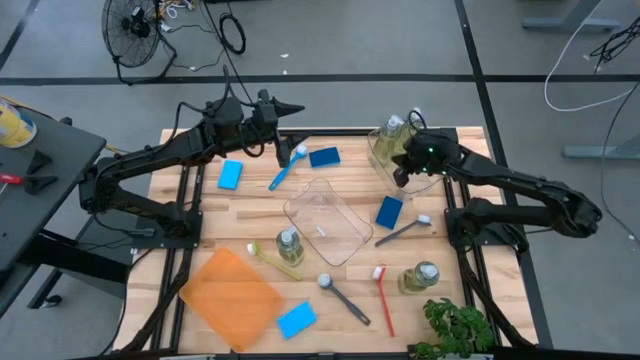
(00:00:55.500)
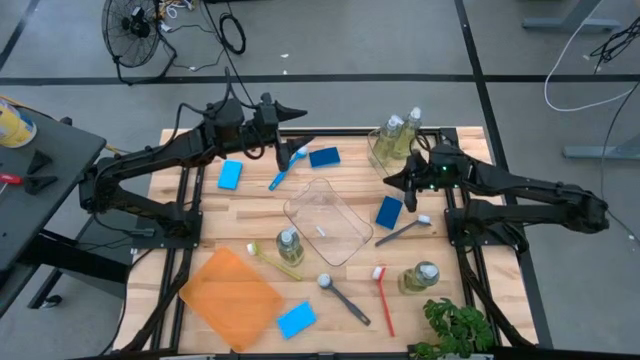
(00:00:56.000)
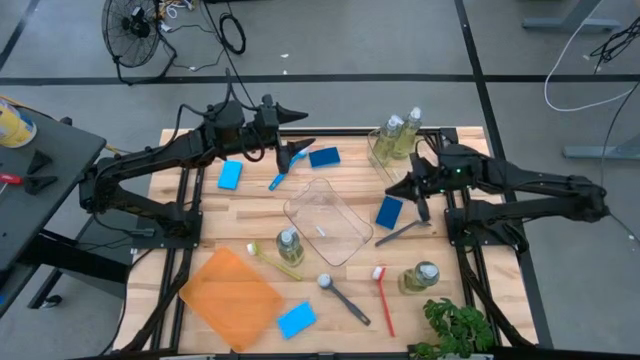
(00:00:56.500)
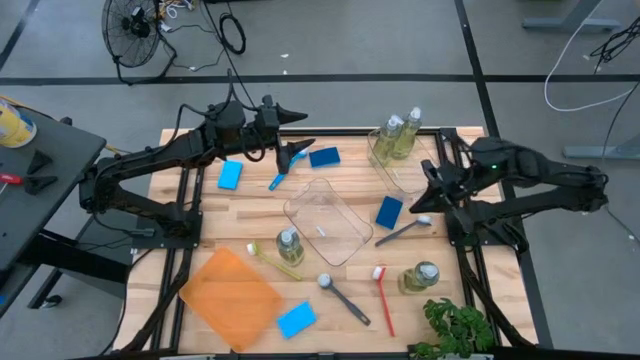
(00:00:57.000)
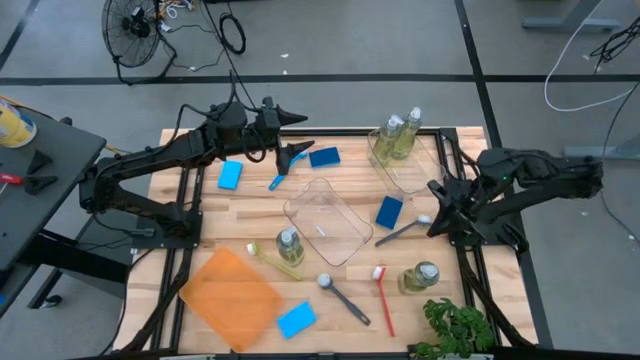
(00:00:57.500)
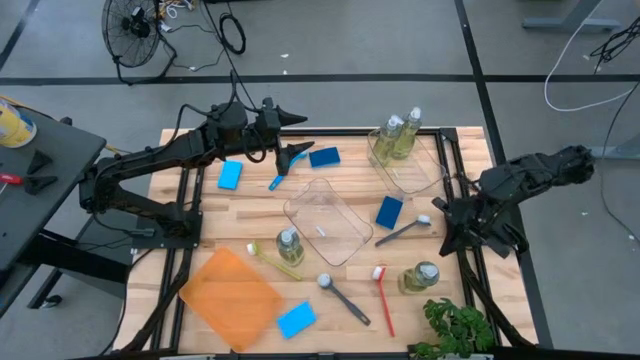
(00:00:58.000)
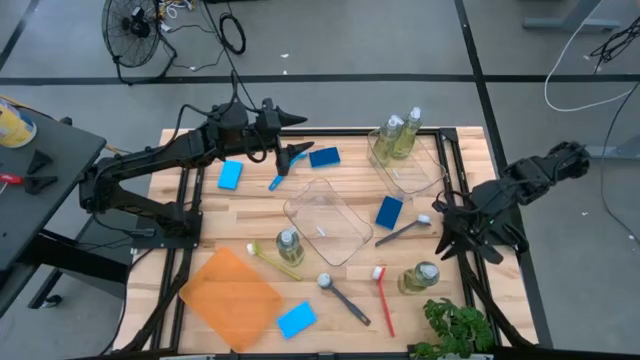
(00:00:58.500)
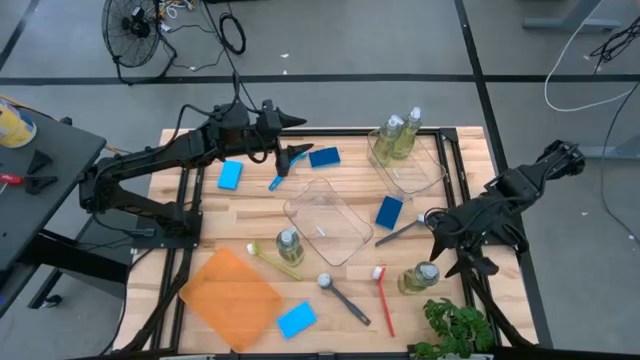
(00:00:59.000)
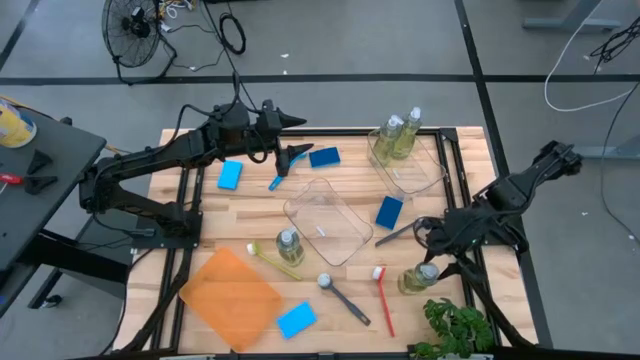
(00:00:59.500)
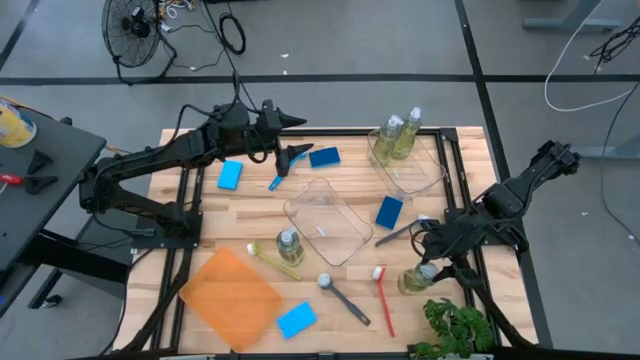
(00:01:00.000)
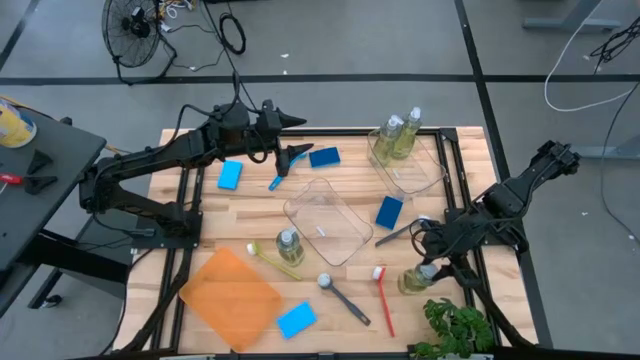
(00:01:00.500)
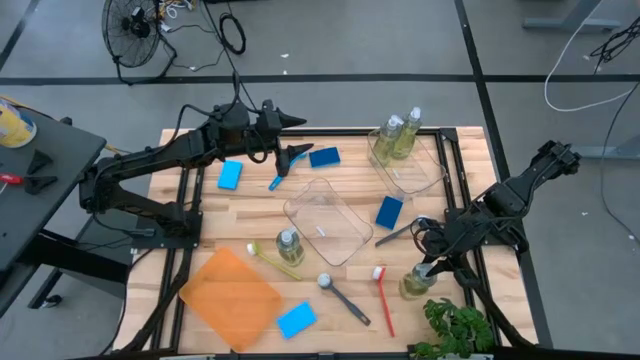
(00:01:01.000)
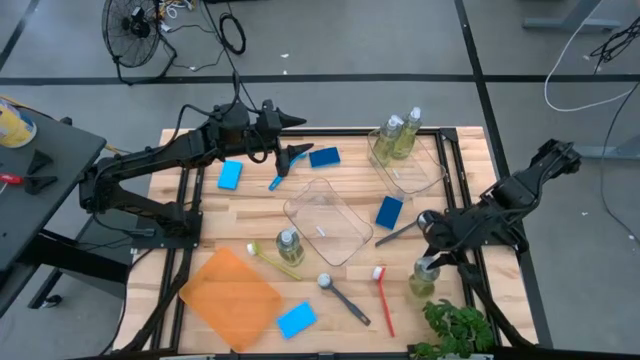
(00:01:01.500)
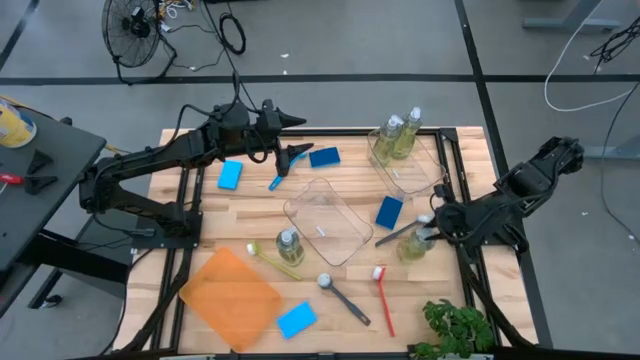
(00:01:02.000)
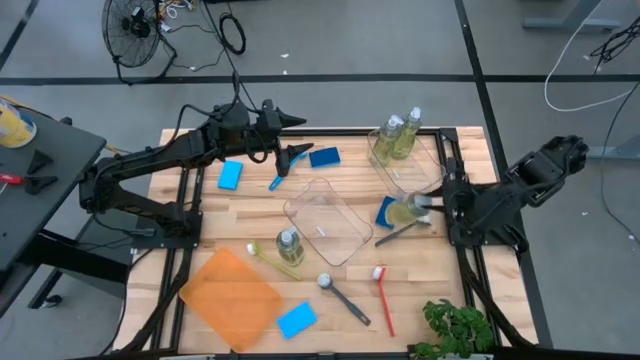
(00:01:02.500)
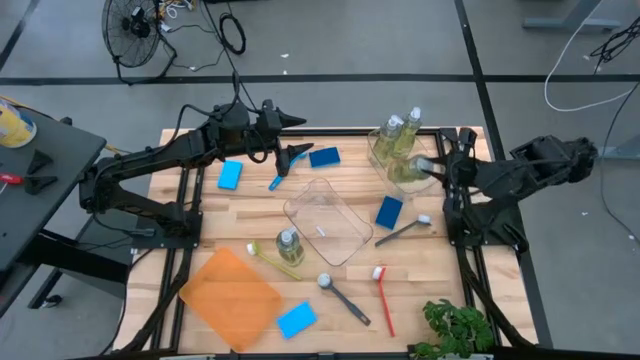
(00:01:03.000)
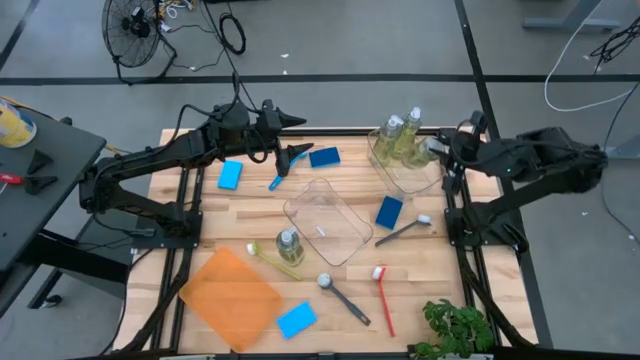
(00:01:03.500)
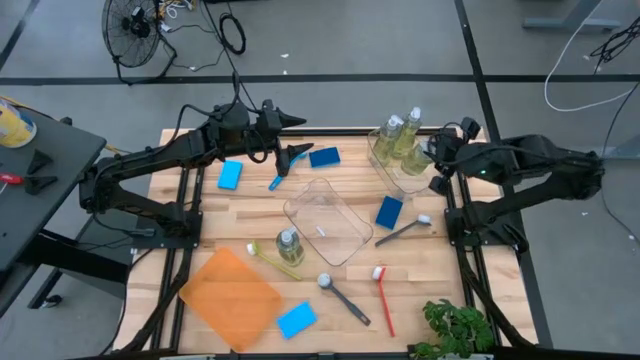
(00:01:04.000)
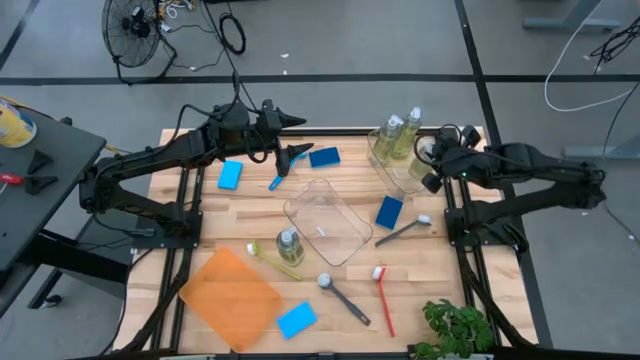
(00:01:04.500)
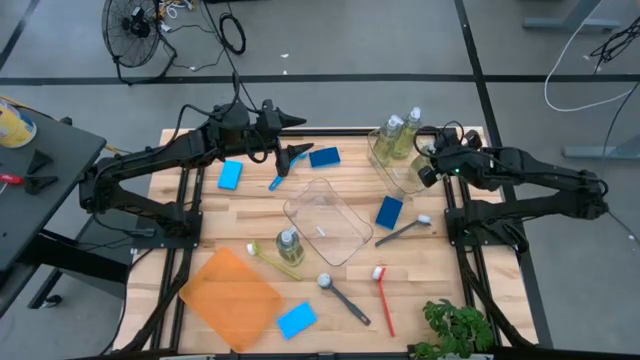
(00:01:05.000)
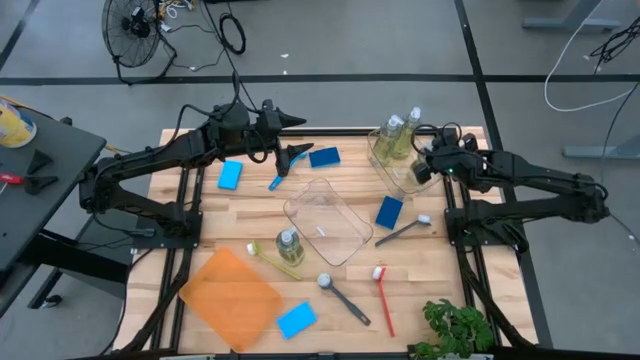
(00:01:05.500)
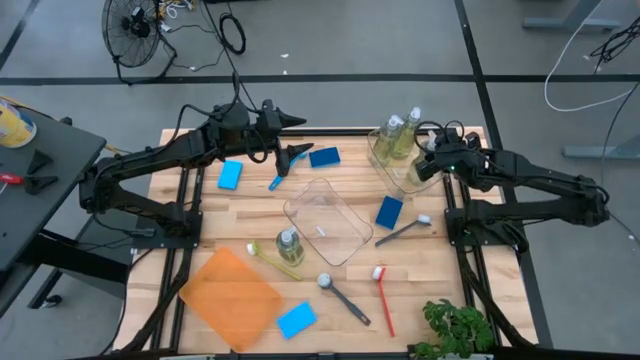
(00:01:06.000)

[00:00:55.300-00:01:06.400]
Task: Pick & Place Kitchen Sink Supplies
Put the yellow dish soap into the top transparent bin

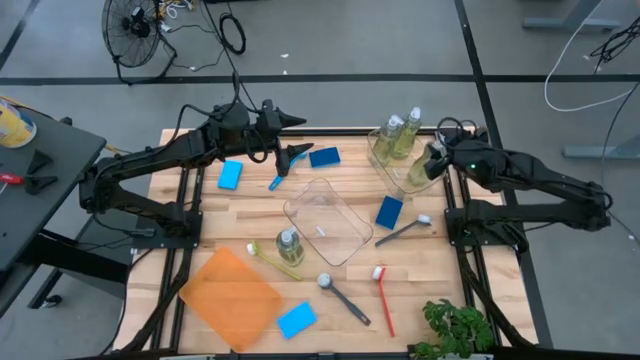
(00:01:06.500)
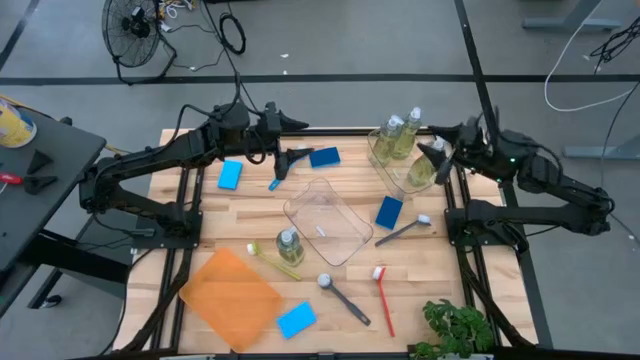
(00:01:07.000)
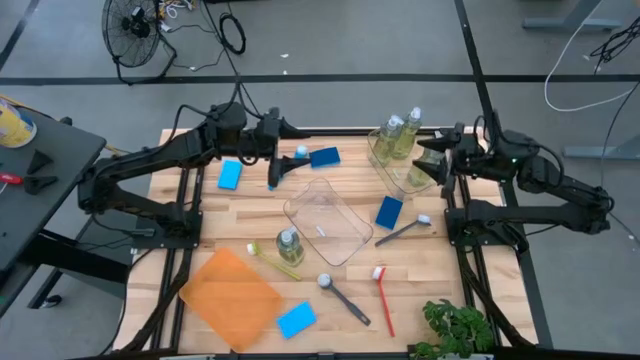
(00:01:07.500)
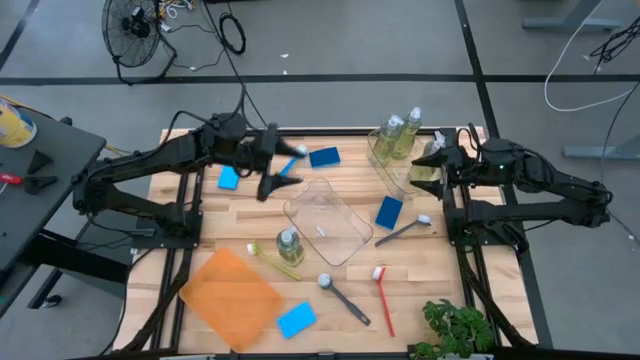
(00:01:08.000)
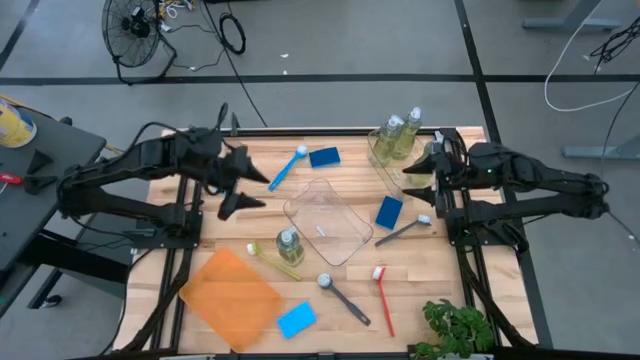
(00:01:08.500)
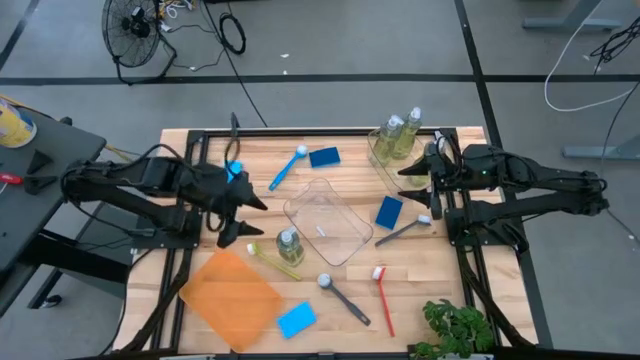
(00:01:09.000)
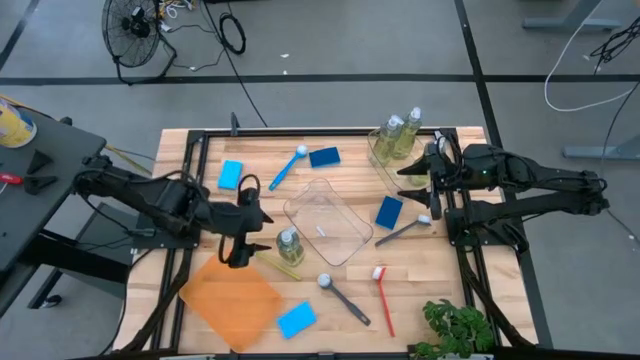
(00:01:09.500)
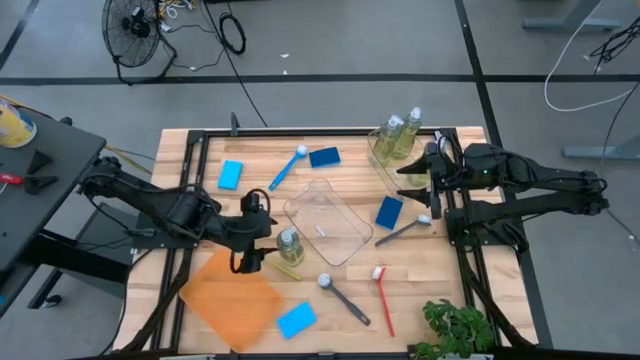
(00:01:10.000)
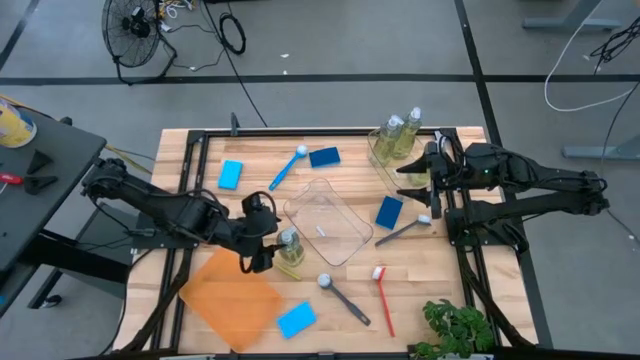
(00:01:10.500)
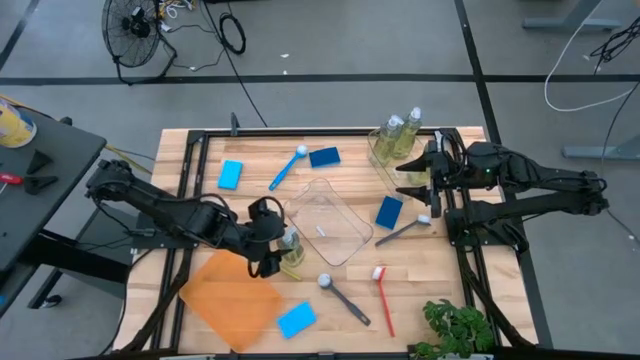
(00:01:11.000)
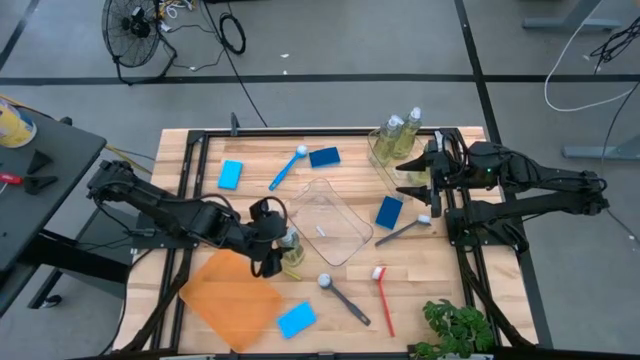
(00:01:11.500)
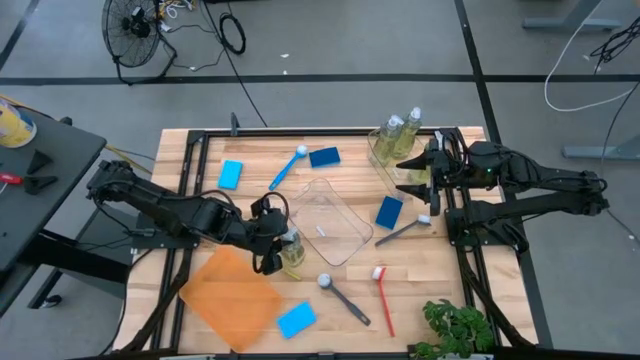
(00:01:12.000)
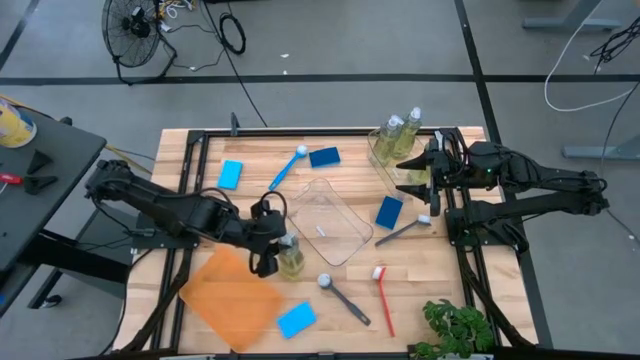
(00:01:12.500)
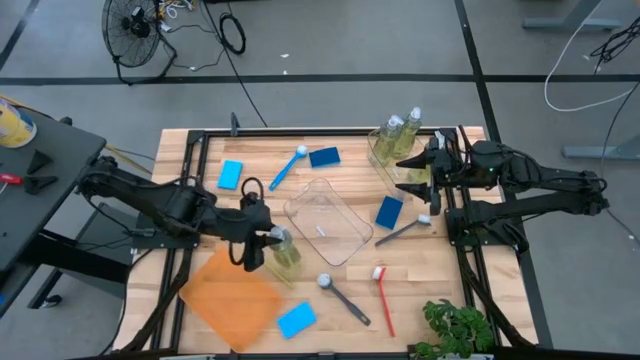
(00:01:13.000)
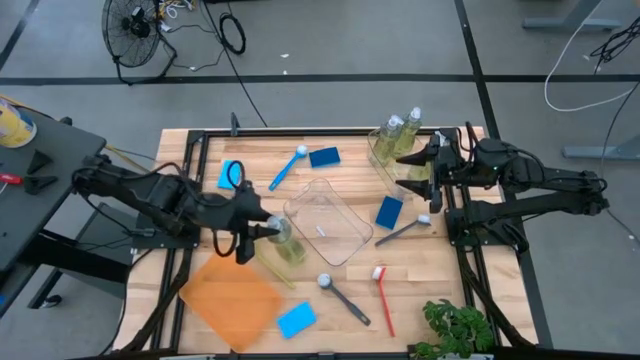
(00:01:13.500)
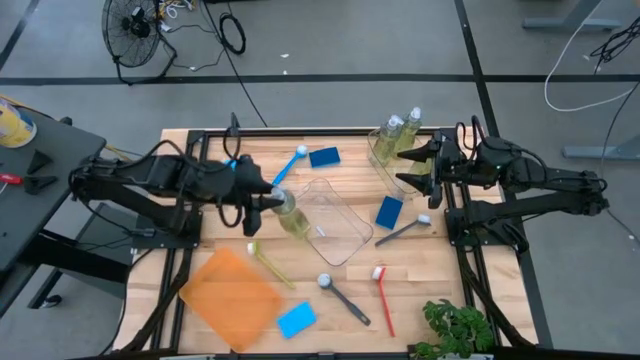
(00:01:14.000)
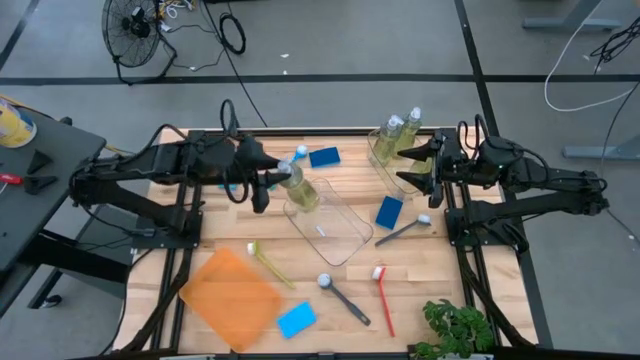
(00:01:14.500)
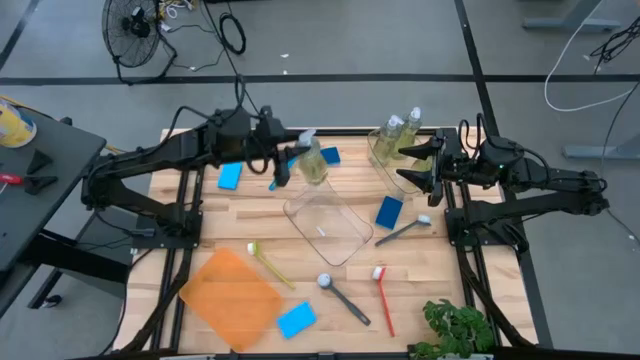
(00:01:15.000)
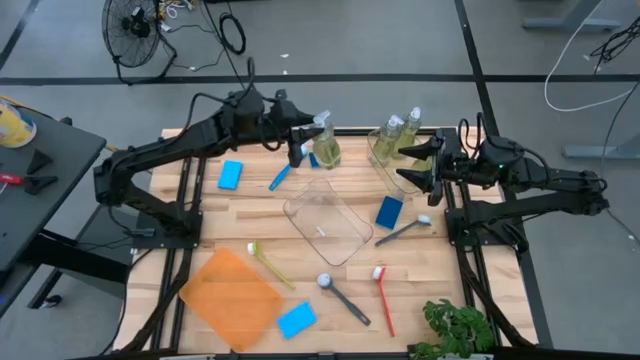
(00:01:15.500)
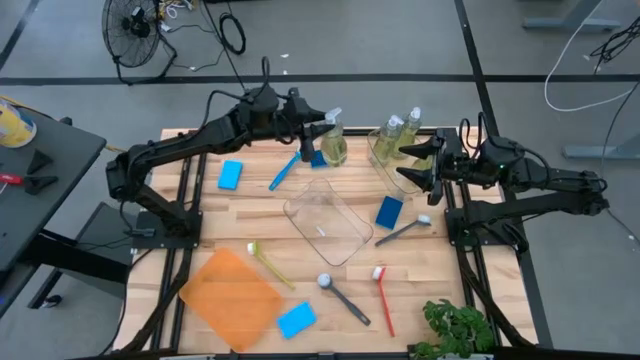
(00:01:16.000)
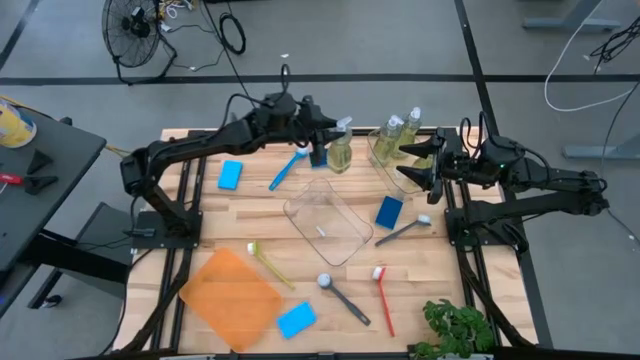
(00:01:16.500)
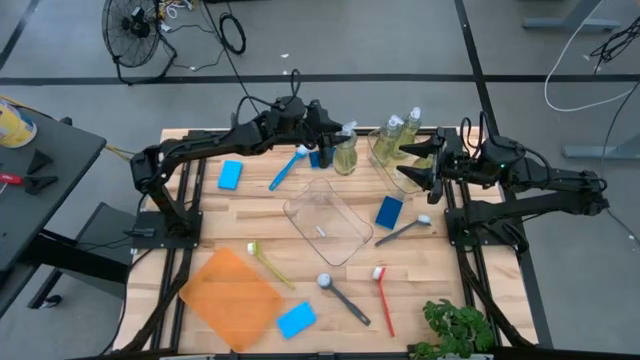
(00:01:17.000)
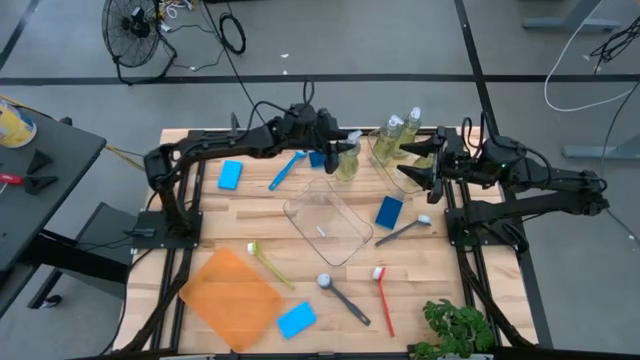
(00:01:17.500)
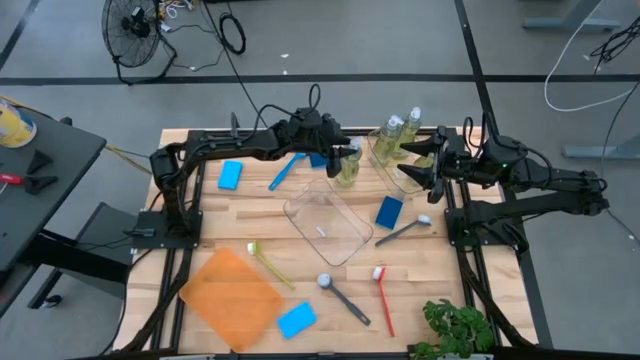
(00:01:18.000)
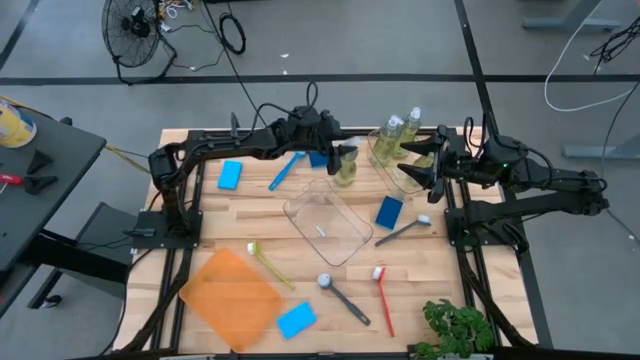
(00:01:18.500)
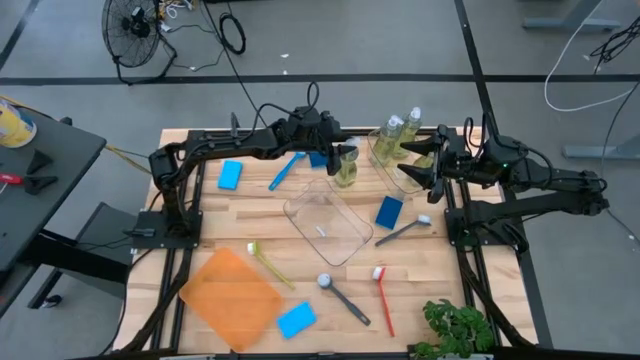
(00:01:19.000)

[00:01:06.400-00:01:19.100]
Put the yellow dish soap into the top transparent bin
